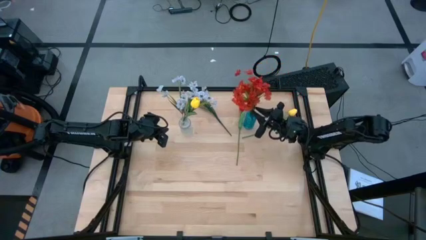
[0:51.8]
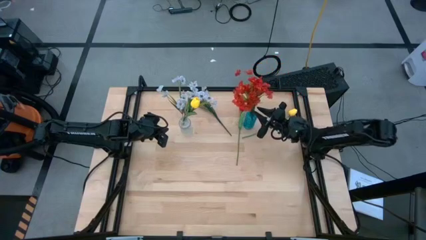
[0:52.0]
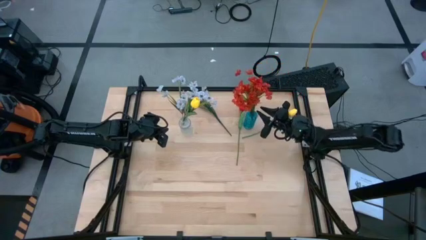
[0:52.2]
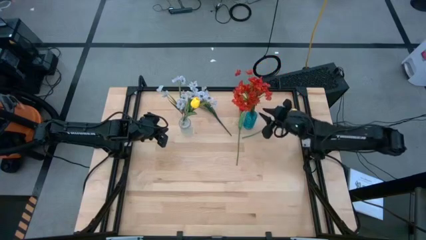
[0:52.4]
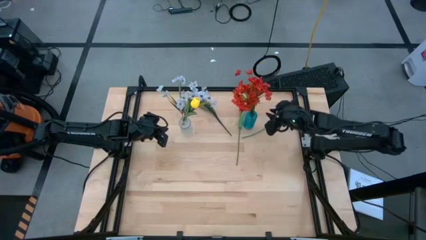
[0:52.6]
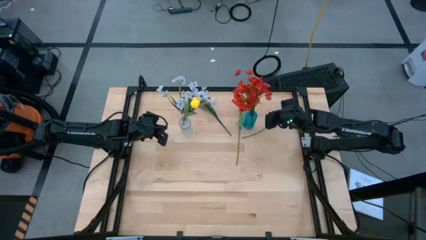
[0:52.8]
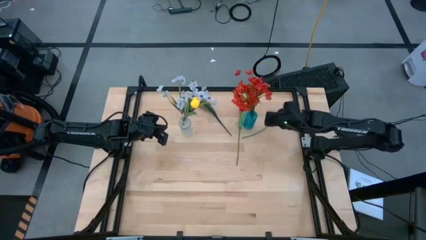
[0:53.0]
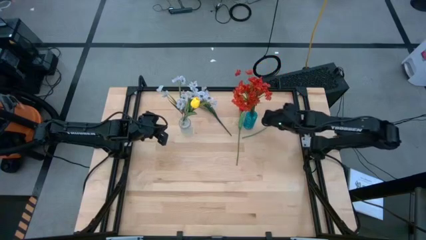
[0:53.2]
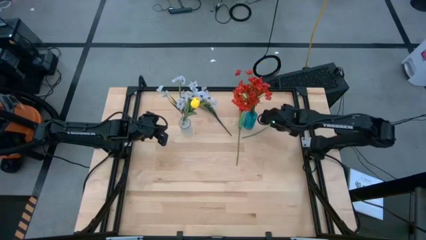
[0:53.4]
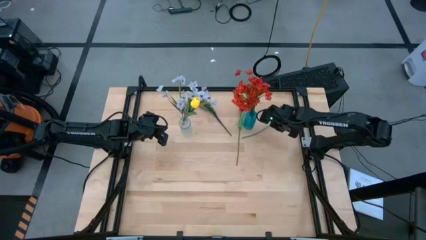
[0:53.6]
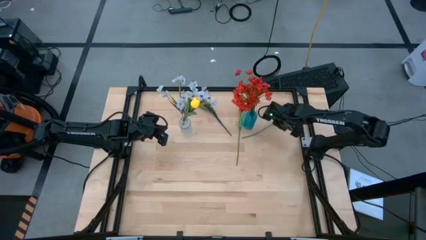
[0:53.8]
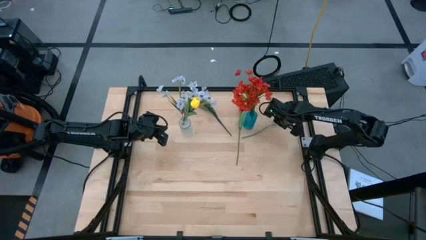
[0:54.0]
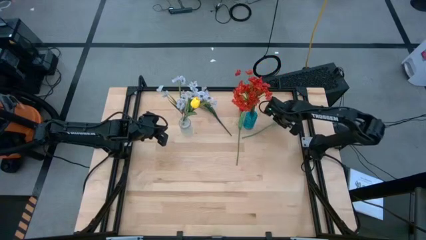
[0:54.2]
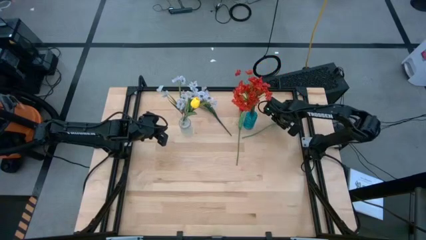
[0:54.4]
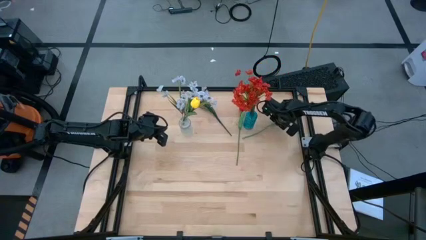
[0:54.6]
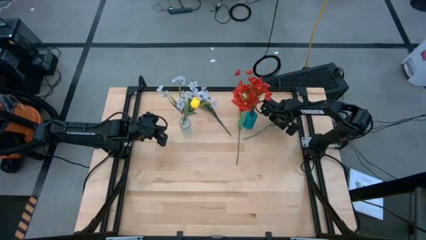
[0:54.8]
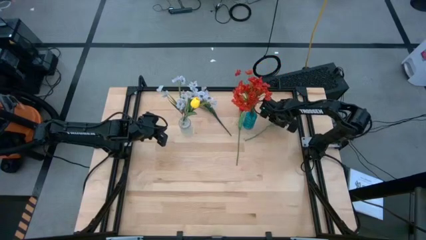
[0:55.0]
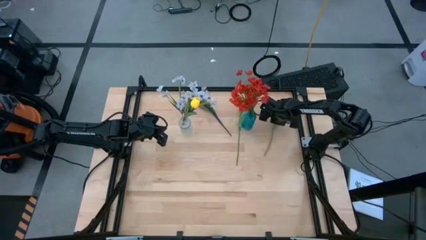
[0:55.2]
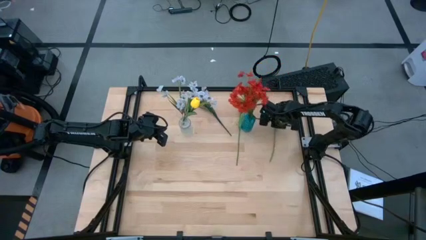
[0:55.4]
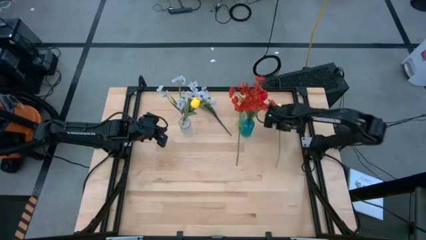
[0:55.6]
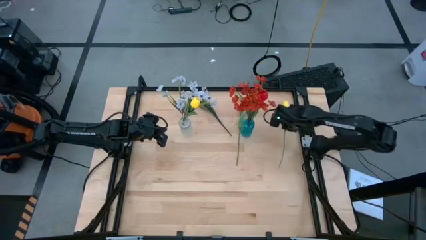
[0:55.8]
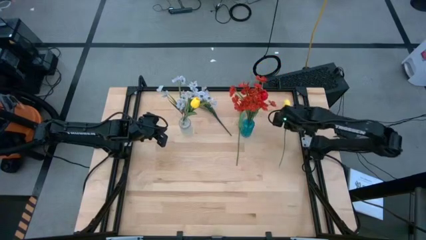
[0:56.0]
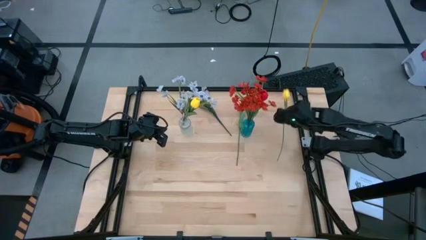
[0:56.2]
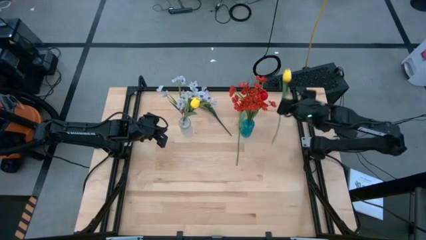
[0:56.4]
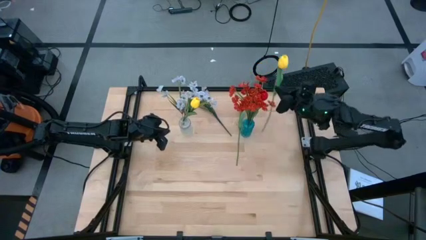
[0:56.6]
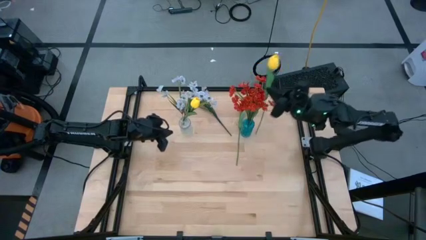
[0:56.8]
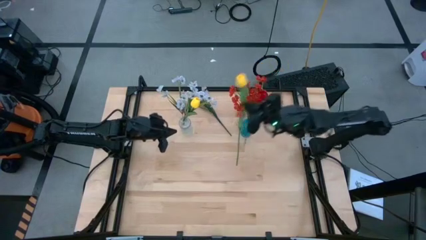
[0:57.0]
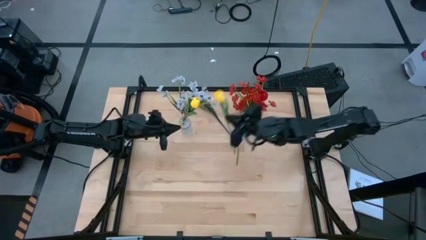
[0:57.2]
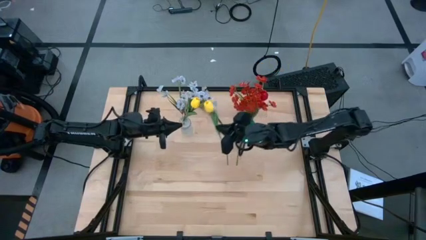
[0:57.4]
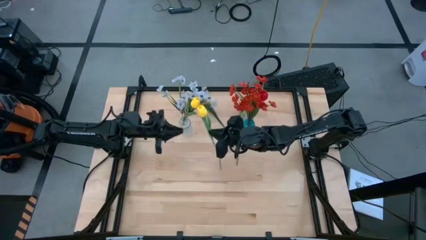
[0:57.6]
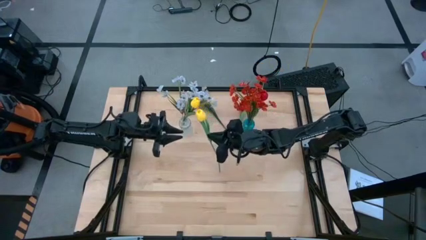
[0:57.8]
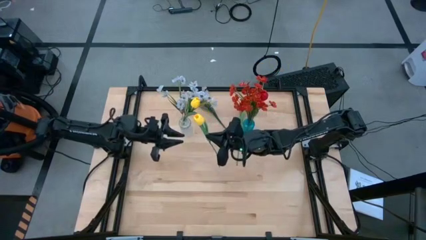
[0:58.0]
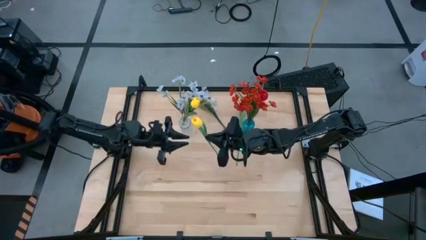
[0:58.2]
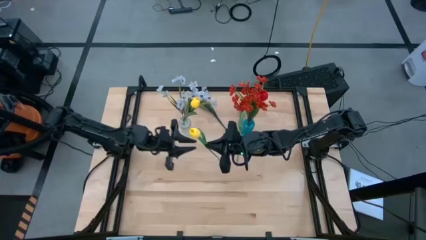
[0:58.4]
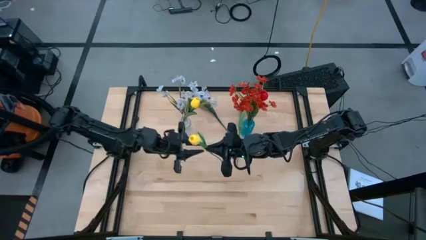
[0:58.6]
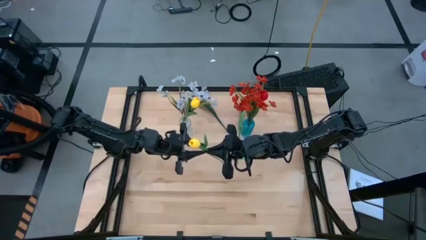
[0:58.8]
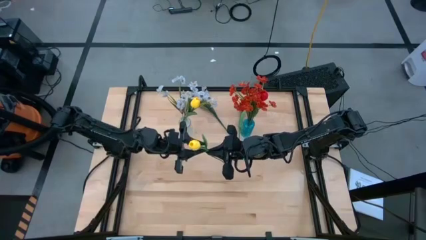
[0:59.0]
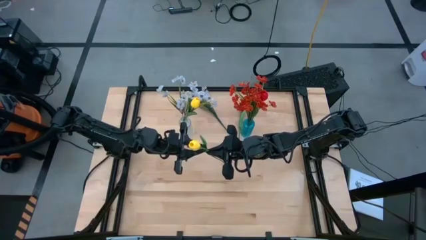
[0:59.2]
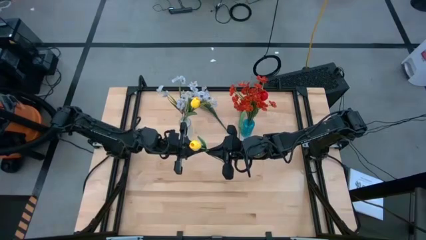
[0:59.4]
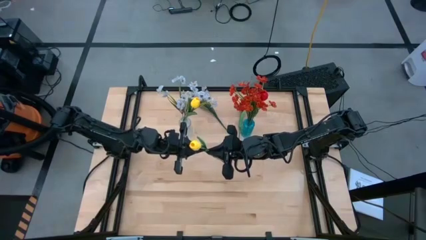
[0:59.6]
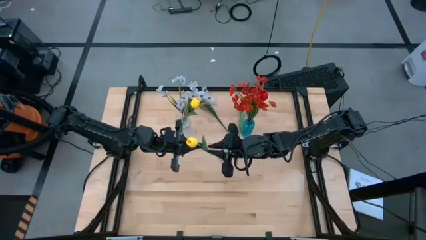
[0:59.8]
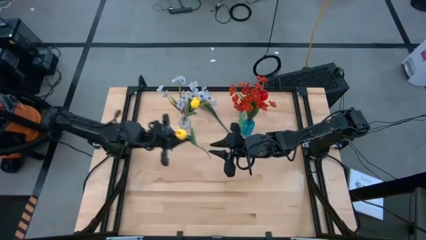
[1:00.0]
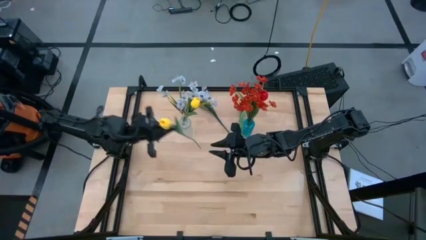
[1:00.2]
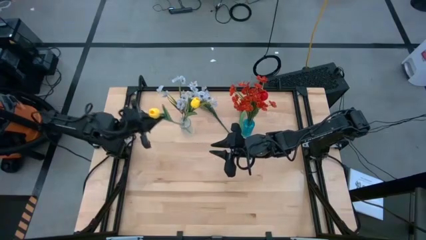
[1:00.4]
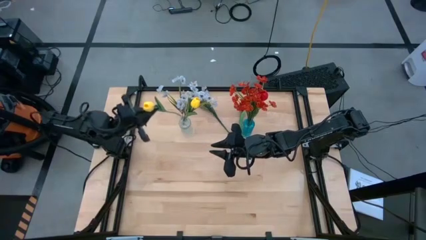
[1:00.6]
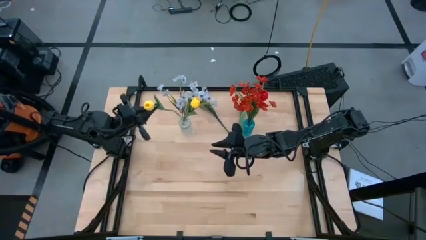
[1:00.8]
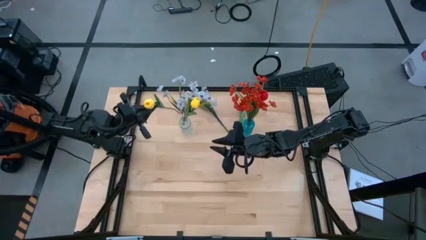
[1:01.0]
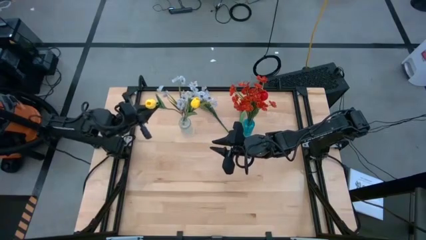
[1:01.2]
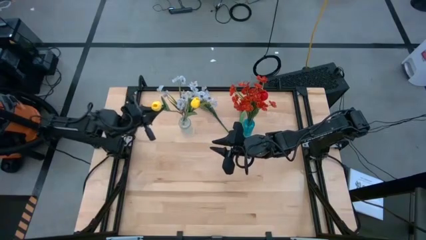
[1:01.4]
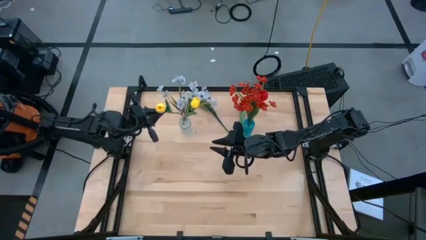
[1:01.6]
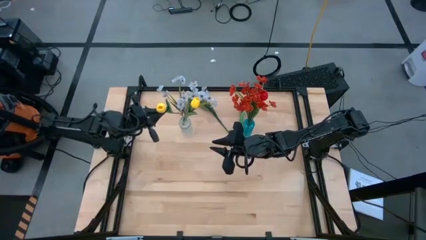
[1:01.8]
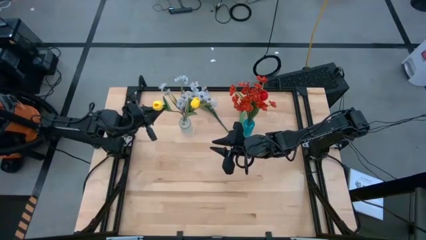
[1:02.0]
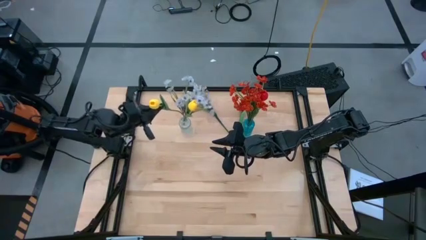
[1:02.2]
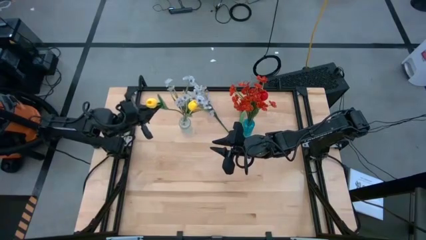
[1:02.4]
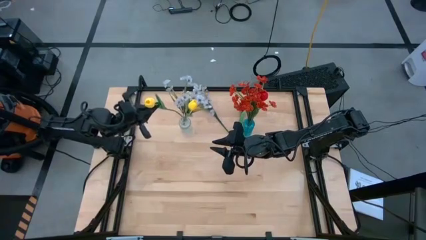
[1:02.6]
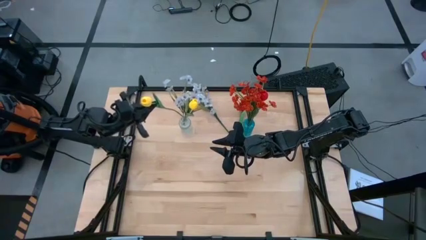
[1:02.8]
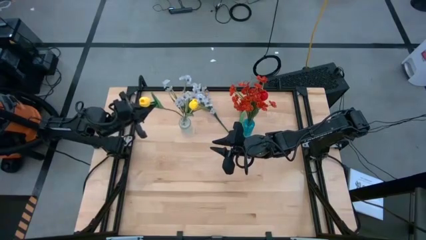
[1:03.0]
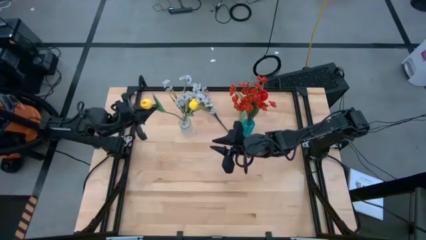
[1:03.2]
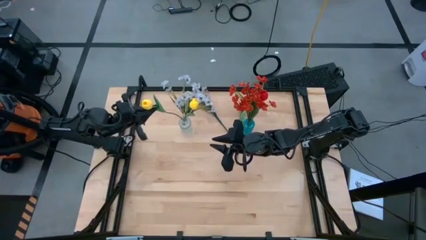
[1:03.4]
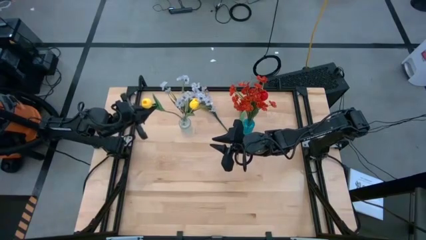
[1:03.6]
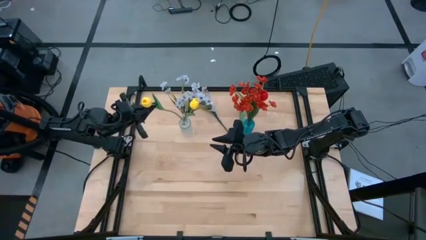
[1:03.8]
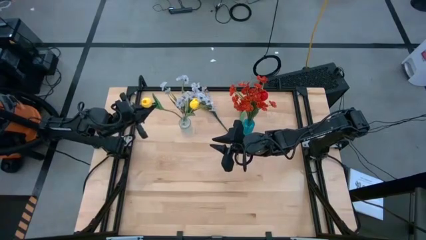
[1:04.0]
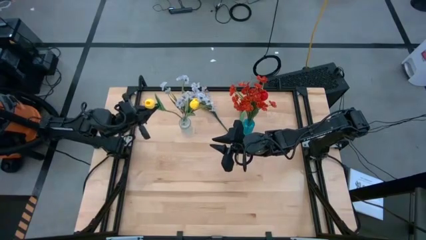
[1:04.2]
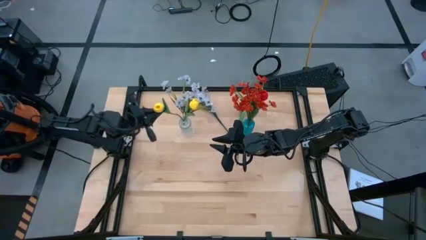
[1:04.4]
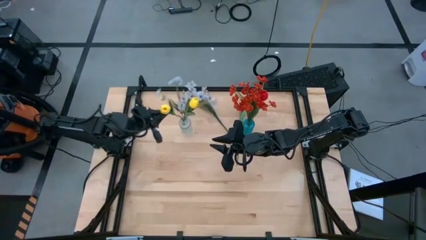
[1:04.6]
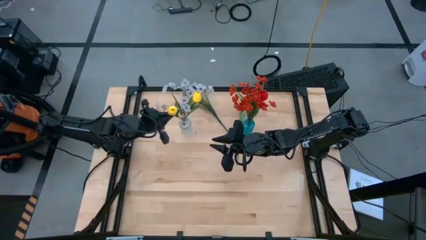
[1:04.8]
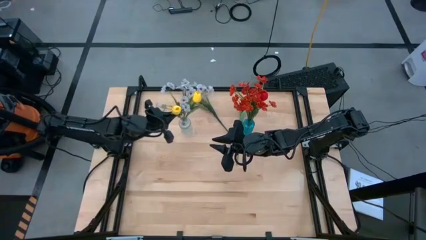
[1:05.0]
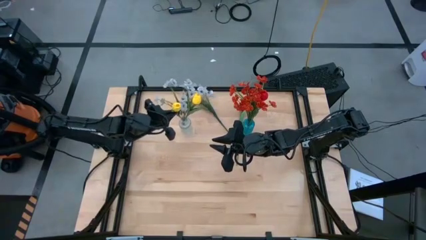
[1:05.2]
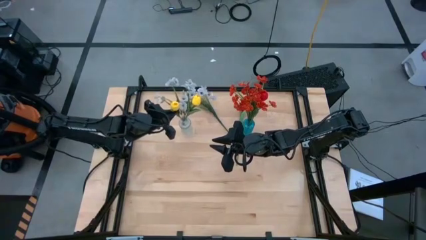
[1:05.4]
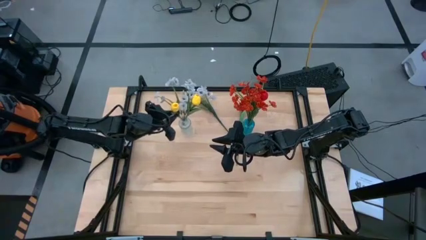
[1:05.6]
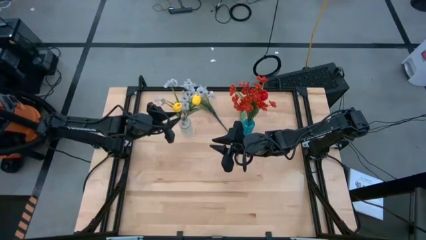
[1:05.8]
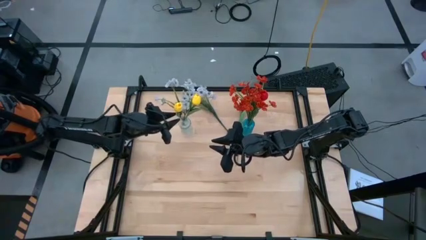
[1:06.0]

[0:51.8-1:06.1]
Task: Sort flowers into vase by color
Put the yellow flowers into the transparent crystal vase

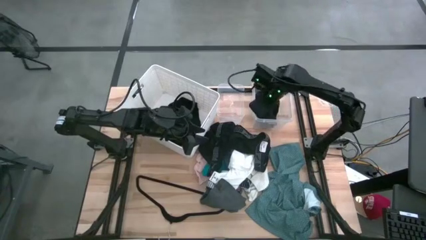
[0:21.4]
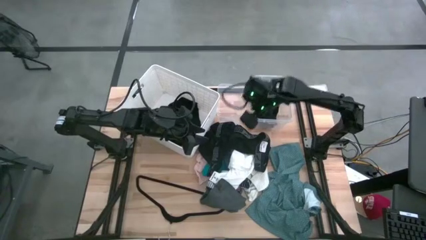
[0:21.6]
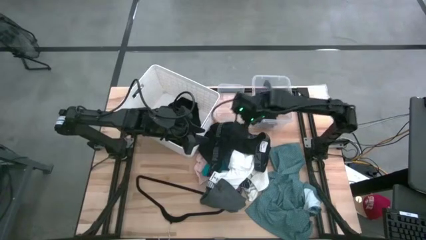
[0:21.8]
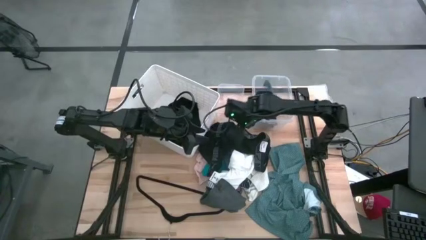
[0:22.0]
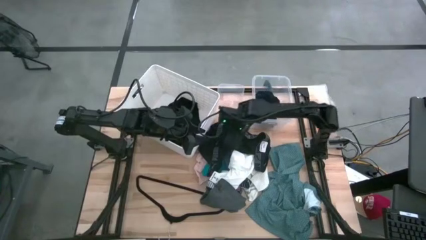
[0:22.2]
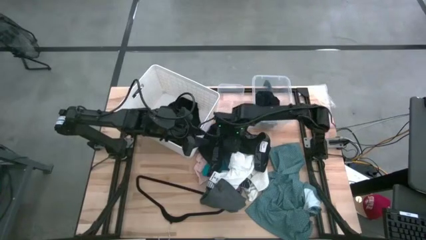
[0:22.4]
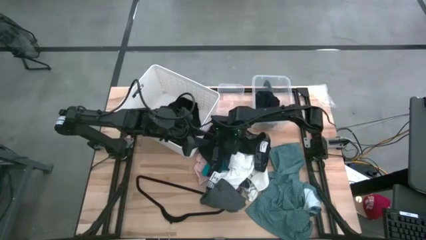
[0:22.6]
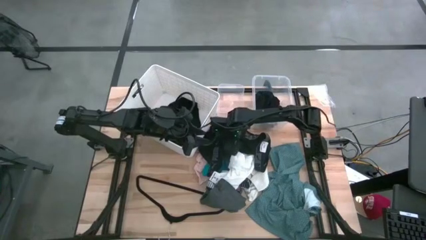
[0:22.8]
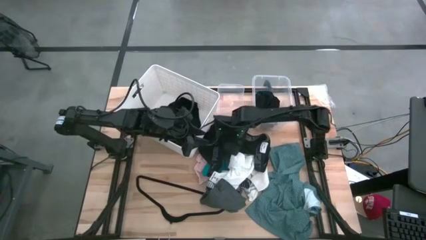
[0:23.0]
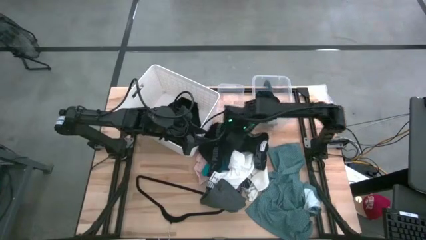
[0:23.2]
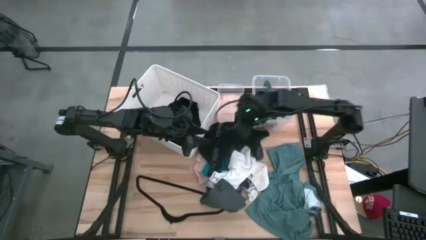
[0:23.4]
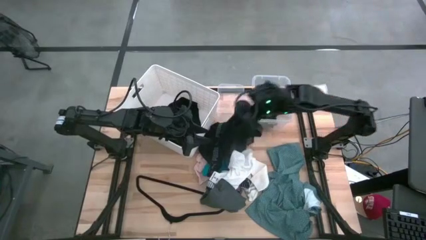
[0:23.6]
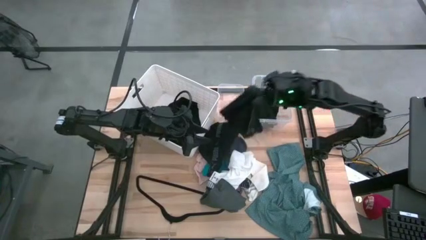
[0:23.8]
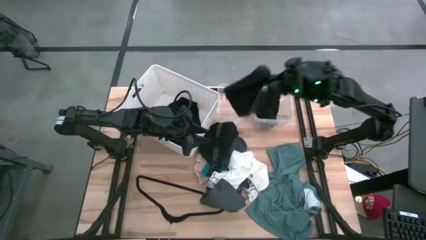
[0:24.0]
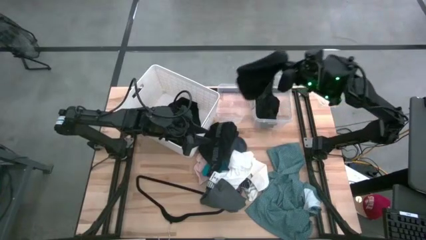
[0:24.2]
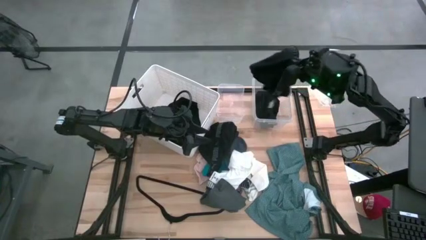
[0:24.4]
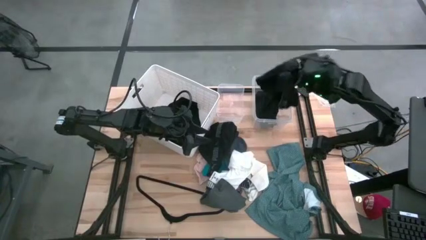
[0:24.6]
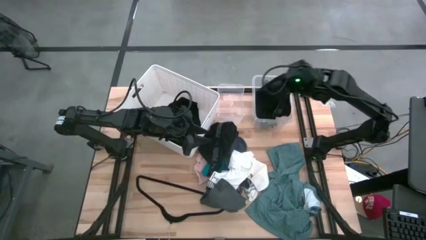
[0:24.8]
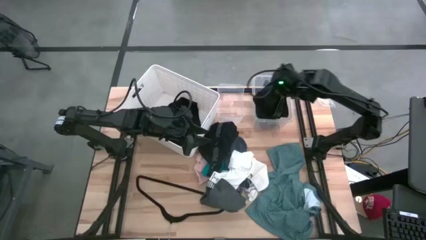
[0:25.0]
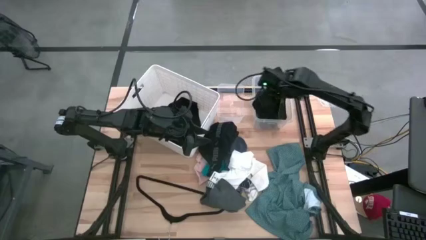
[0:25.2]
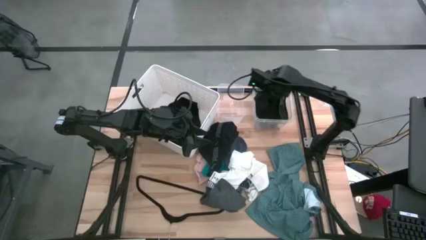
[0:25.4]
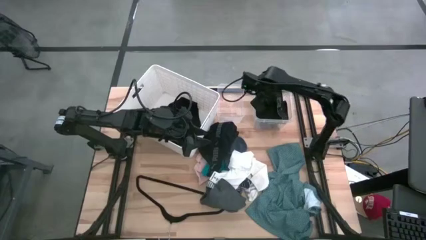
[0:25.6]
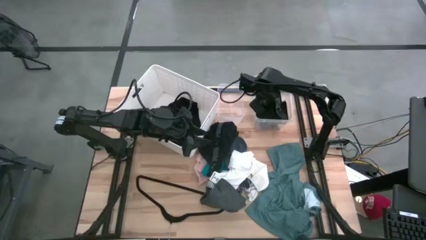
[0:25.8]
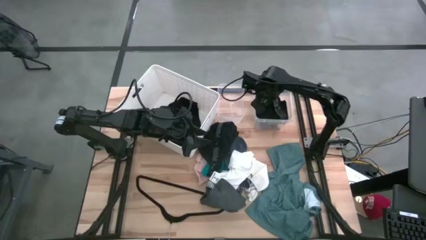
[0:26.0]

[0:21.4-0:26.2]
Task: Pick & Place Cloths
Put the black underwear into the right transparent bin
